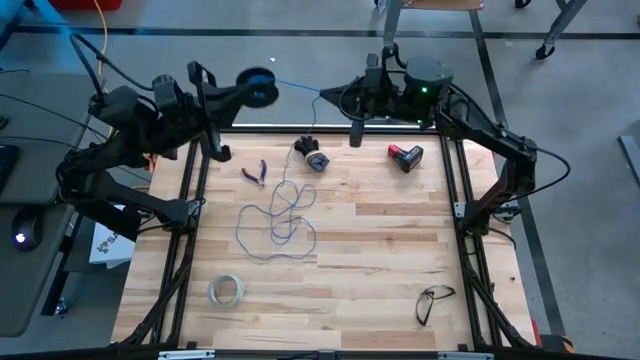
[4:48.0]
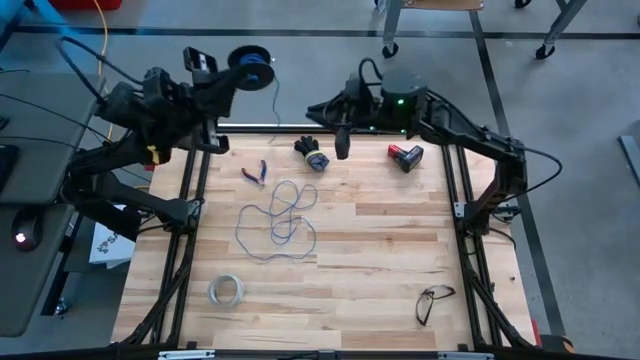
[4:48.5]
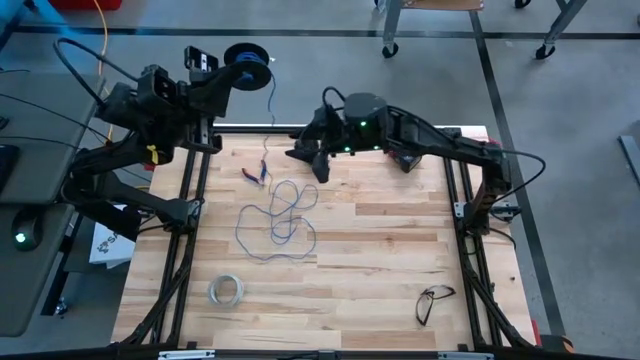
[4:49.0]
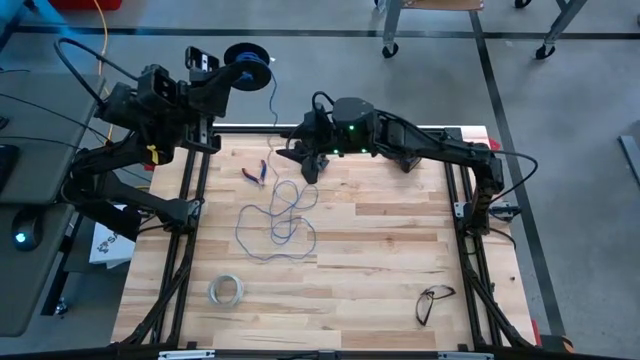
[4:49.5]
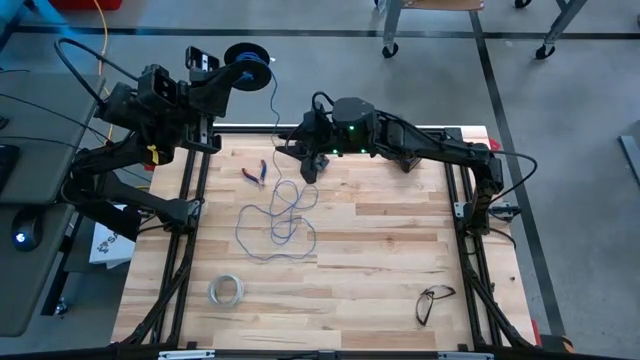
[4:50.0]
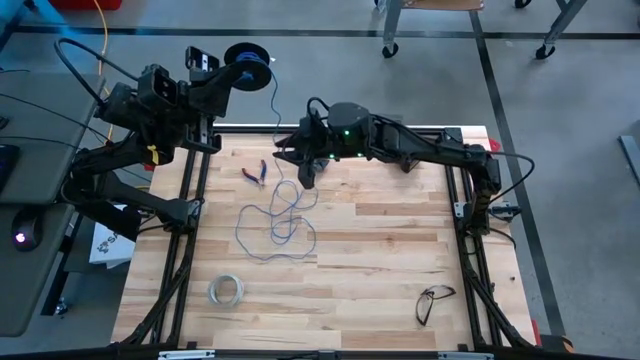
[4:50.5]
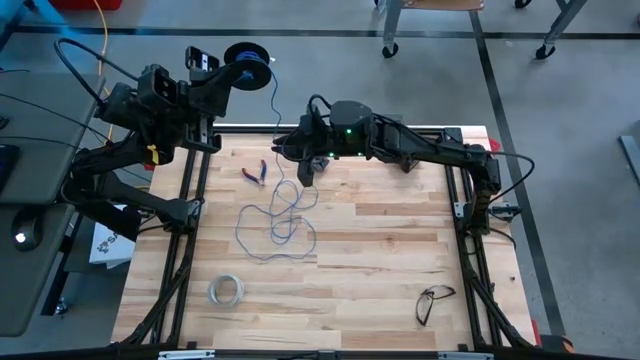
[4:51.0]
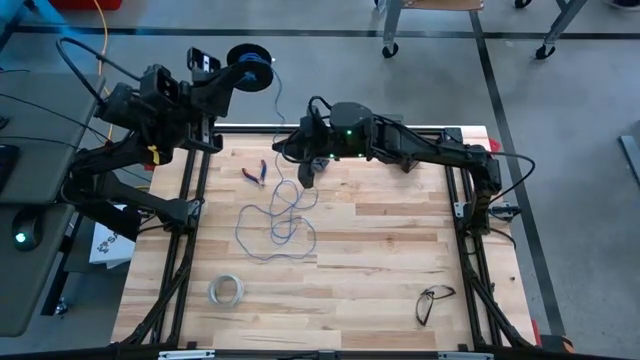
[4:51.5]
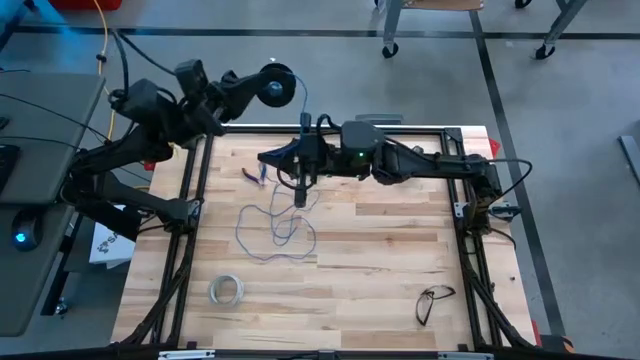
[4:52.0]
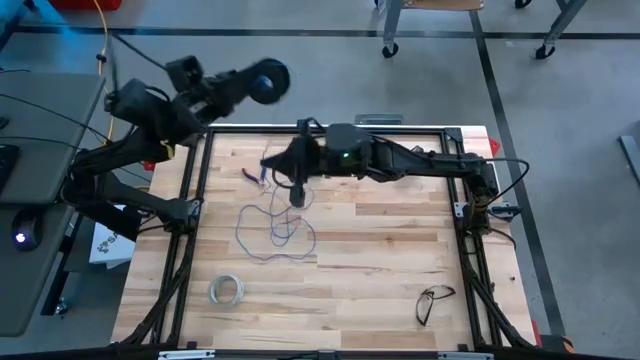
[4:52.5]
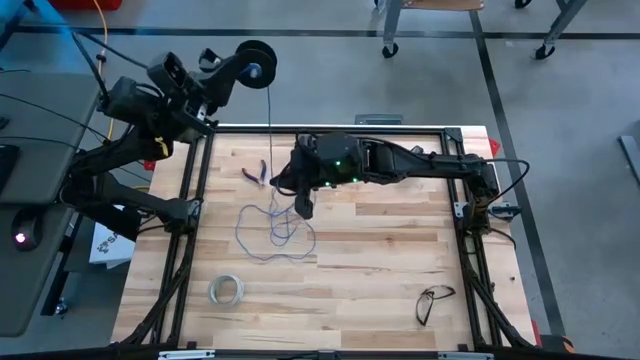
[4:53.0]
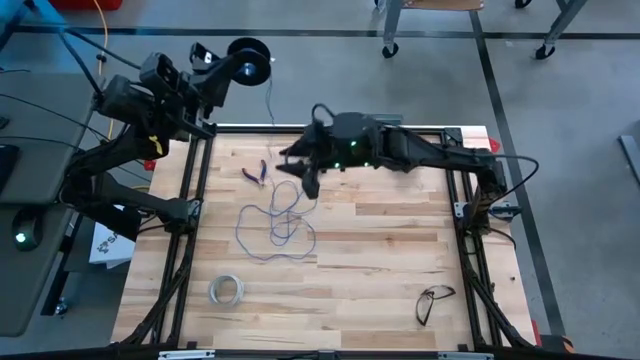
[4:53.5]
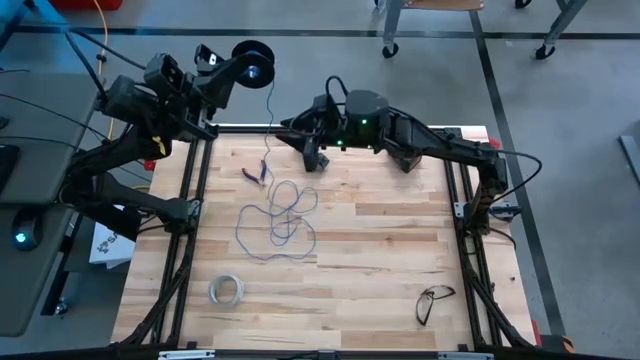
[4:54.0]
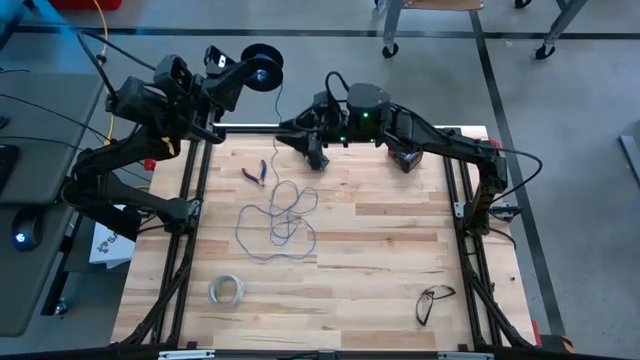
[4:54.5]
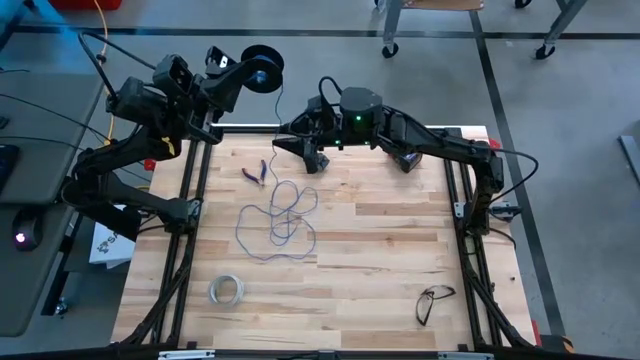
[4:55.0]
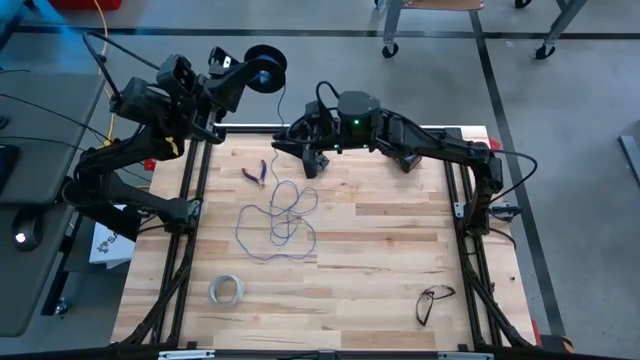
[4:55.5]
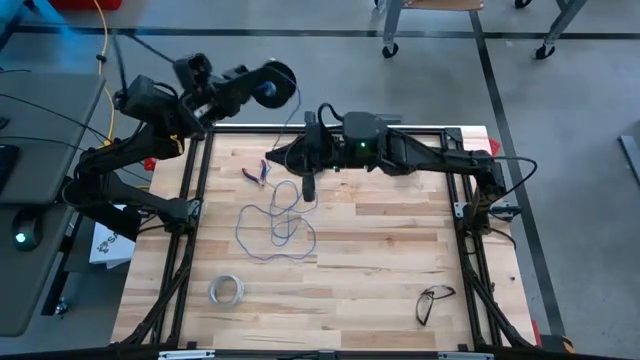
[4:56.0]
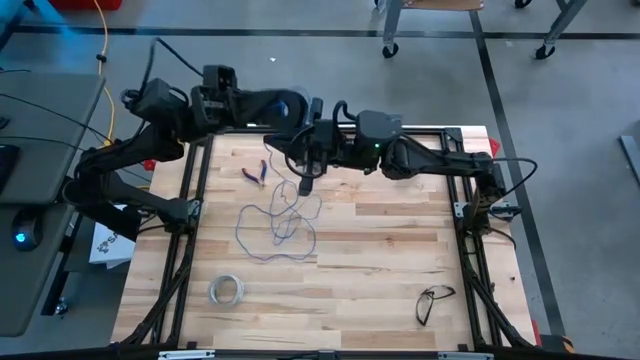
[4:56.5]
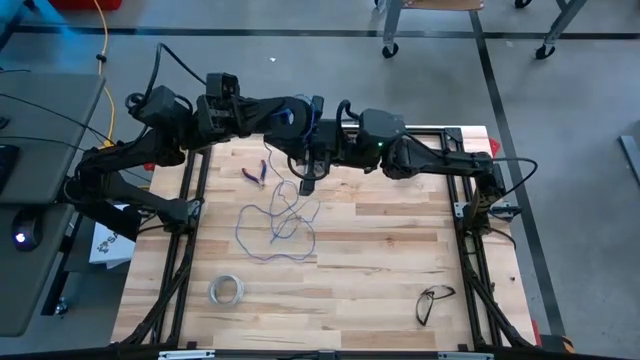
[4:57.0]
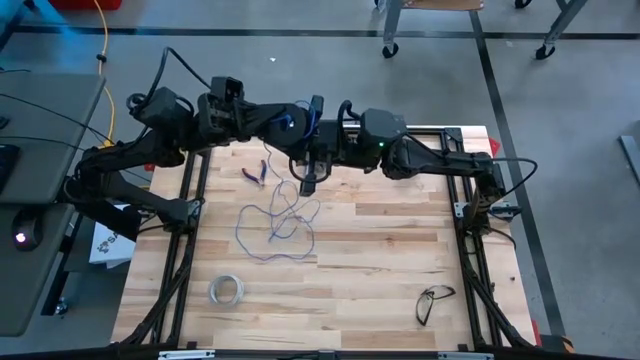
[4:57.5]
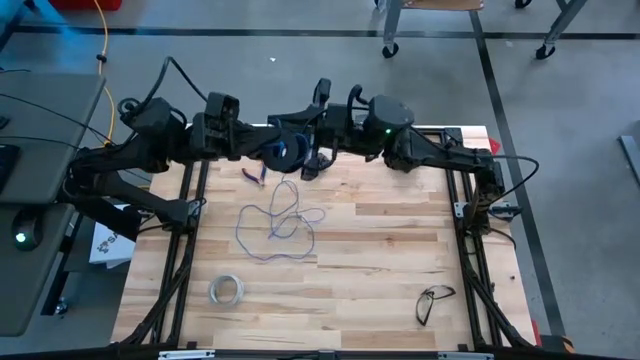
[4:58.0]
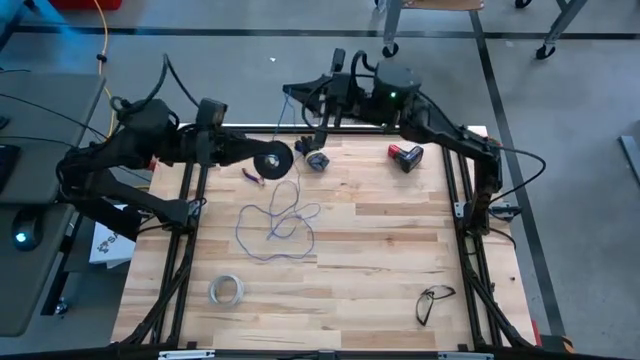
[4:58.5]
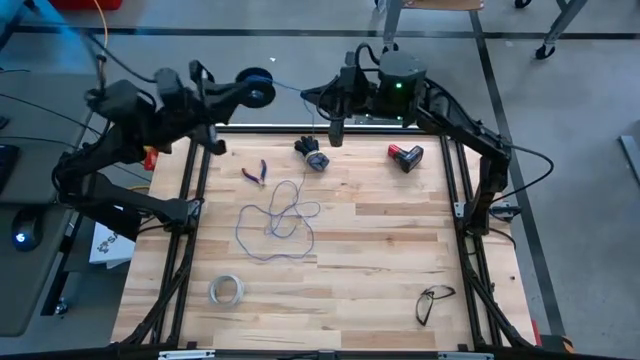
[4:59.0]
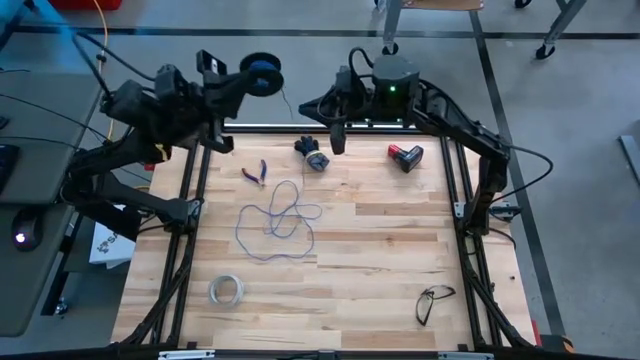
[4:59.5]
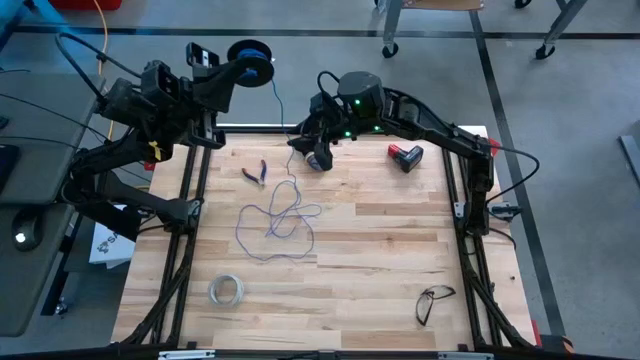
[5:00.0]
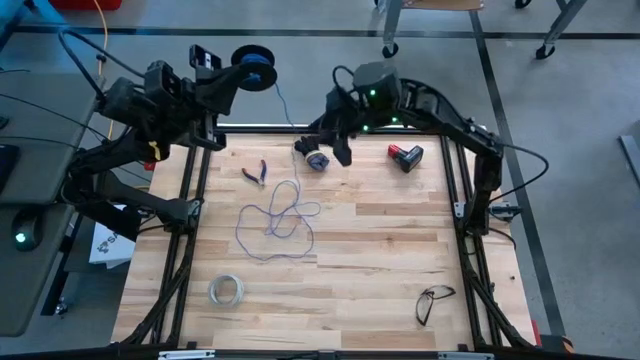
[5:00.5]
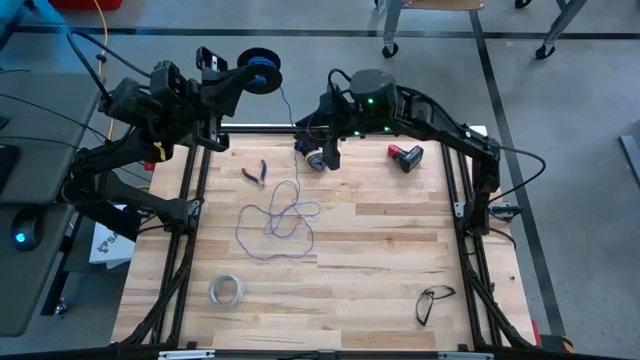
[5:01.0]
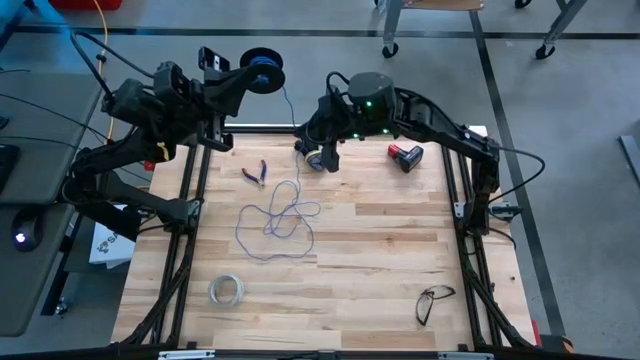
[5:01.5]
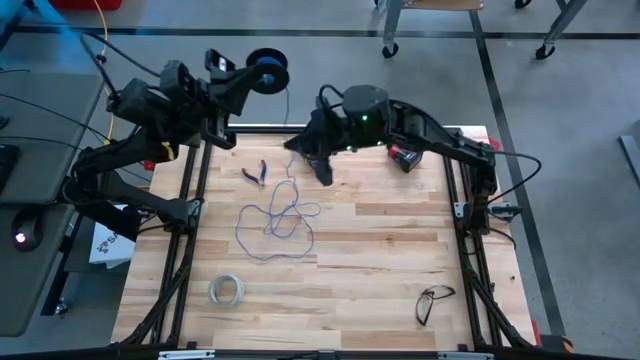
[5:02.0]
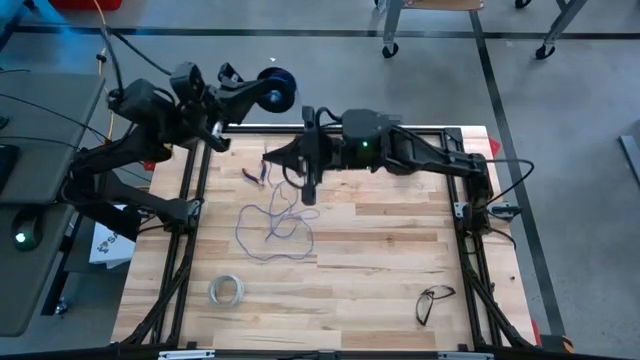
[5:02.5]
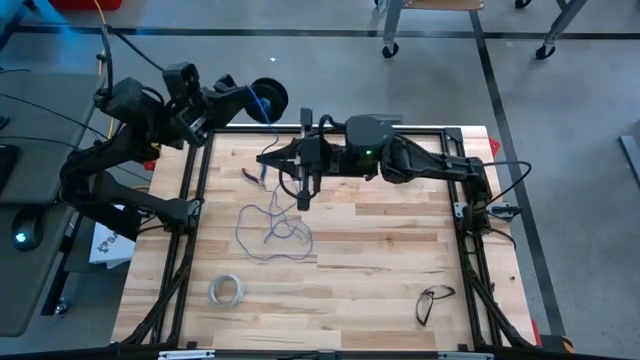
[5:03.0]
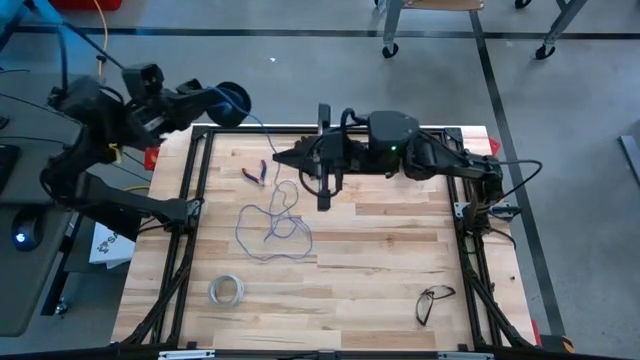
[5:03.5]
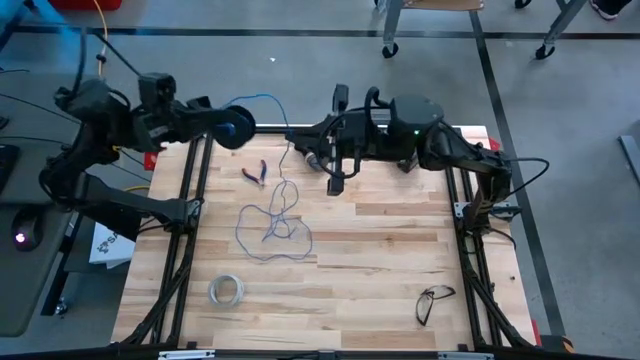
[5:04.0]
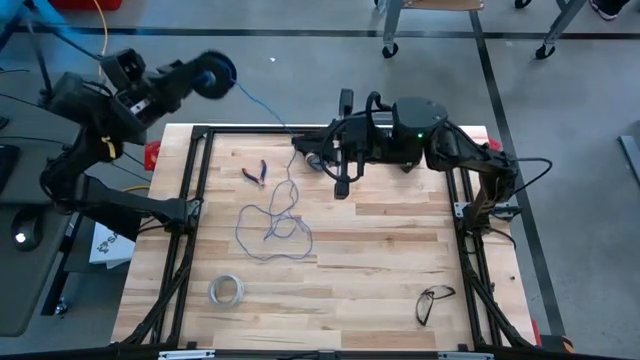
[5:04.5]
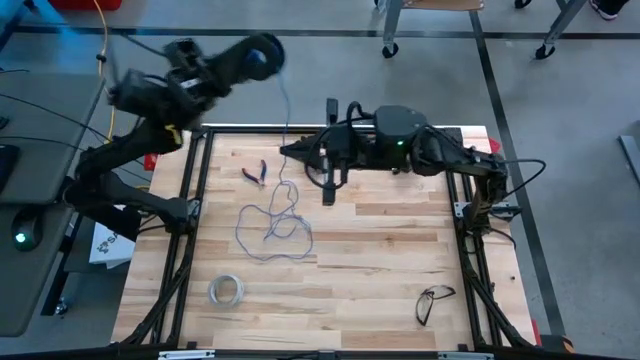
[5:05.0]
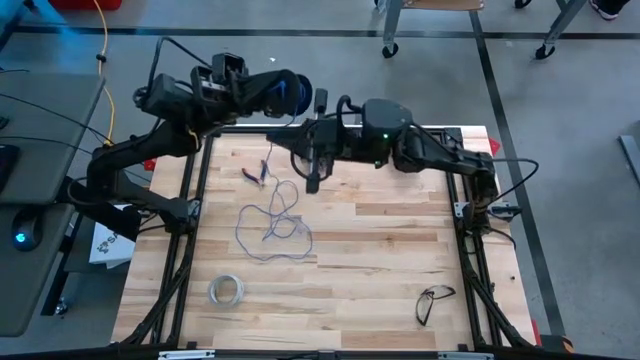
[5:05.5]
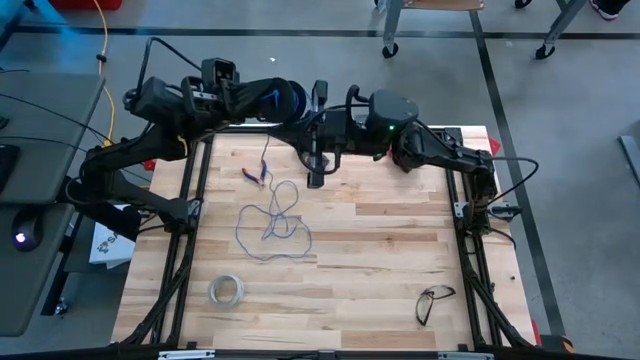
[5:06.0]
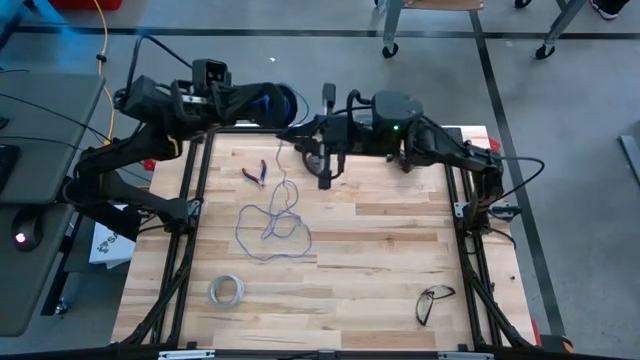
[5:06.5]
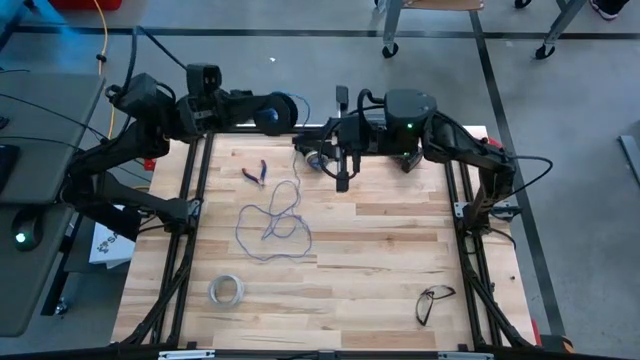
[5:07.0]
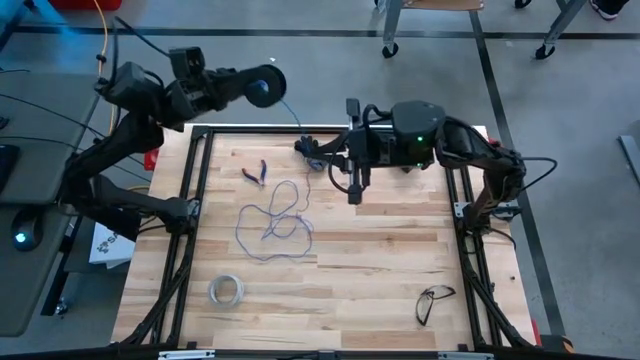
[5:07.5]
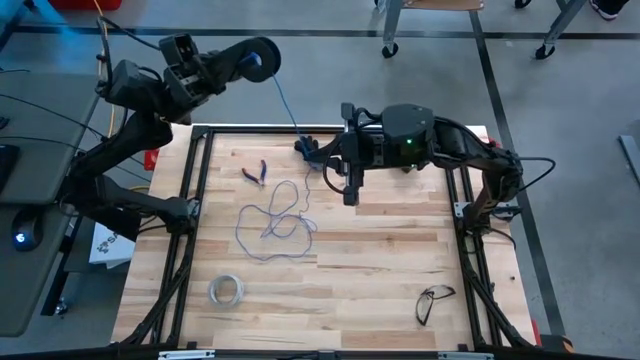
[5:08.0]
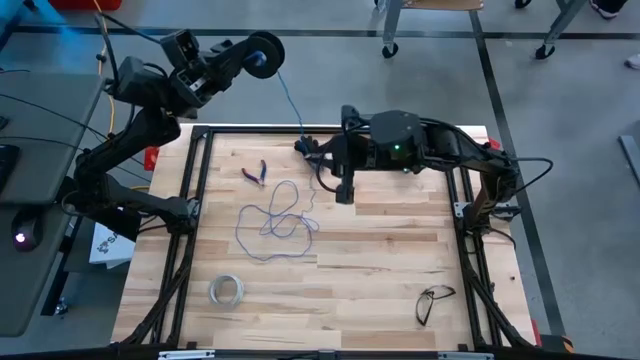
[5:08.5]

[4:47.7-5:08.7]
Task: Coil cords
Coil the blue wire onto the black spool
